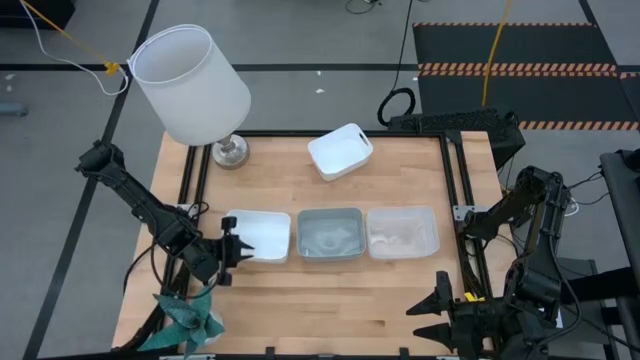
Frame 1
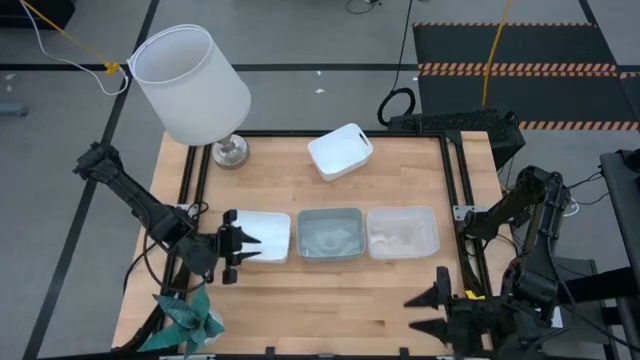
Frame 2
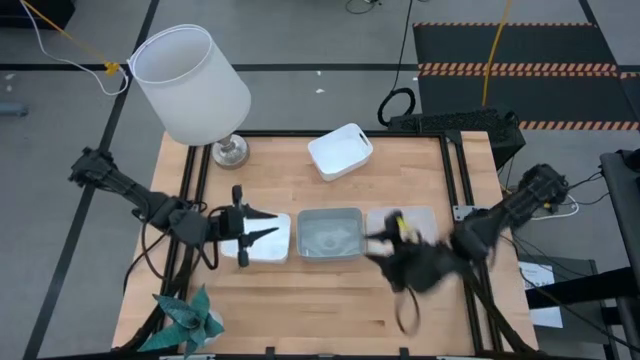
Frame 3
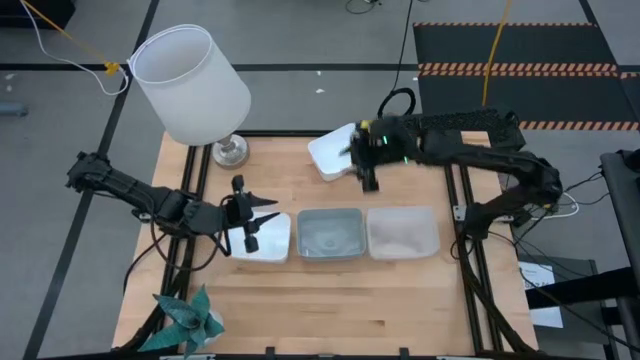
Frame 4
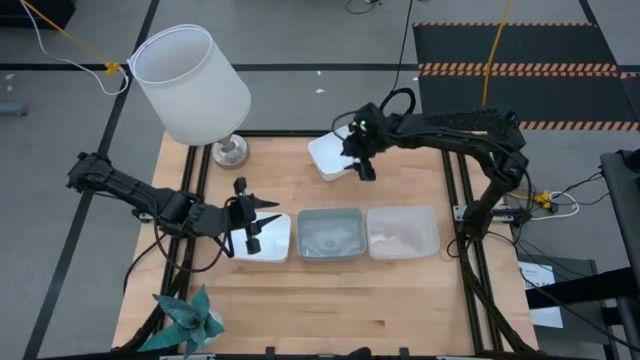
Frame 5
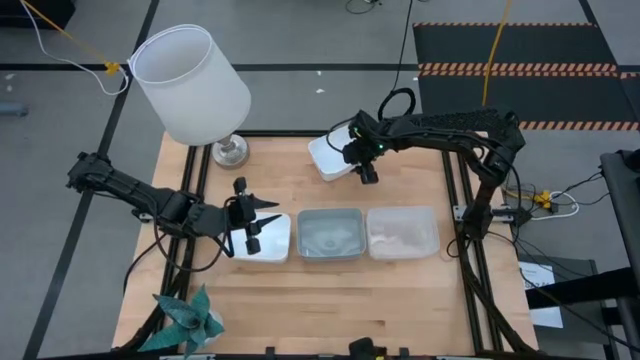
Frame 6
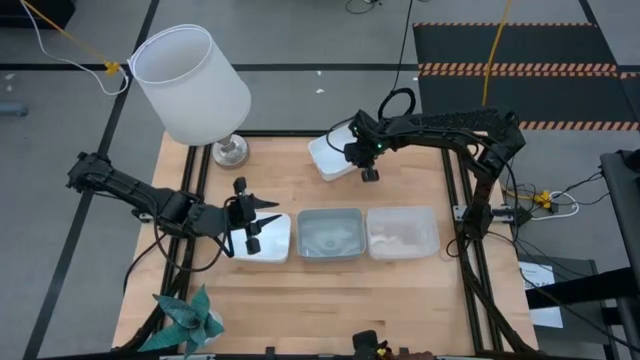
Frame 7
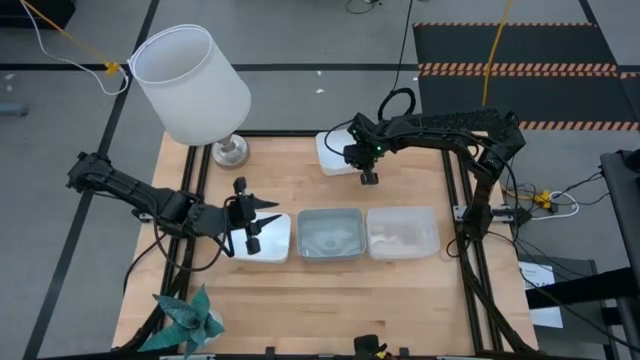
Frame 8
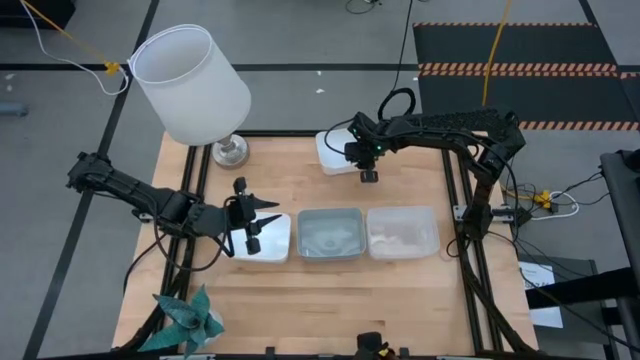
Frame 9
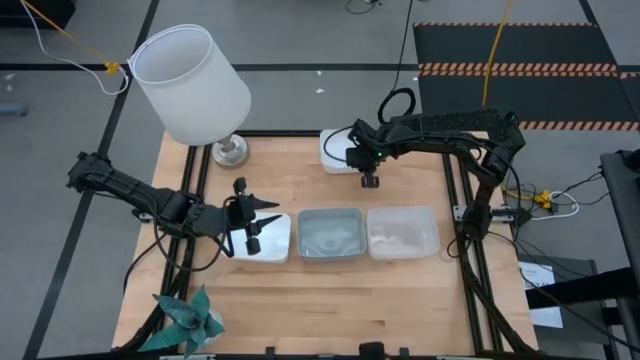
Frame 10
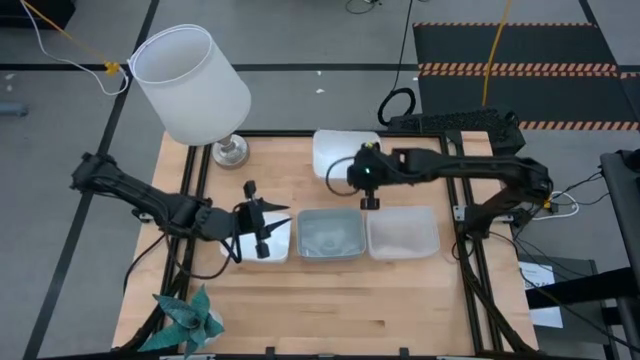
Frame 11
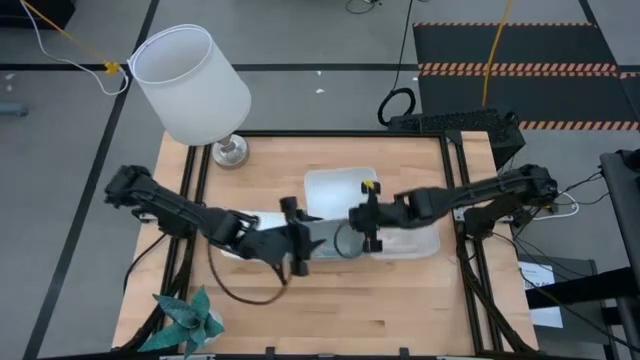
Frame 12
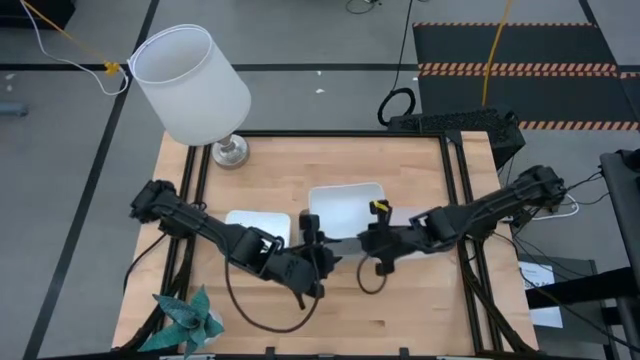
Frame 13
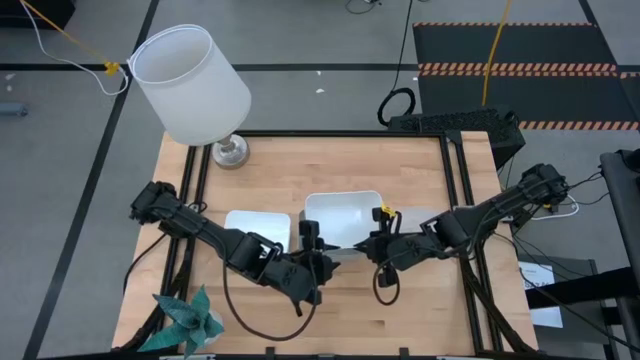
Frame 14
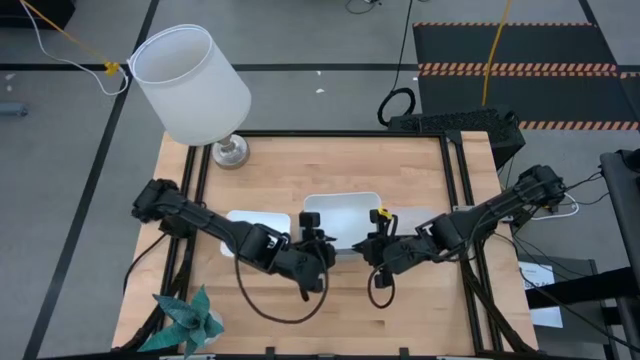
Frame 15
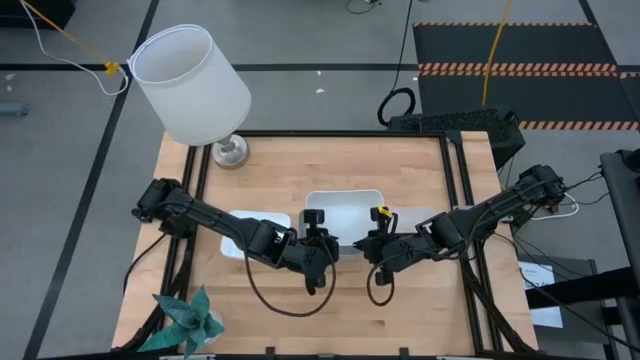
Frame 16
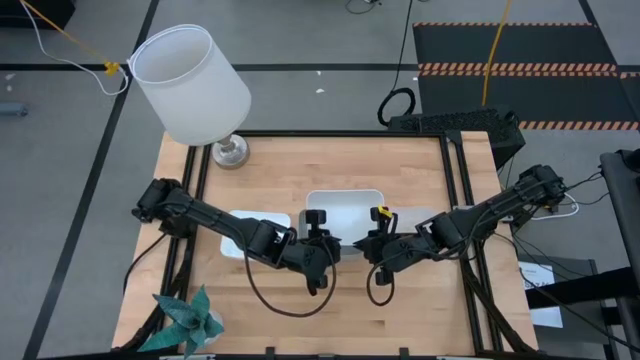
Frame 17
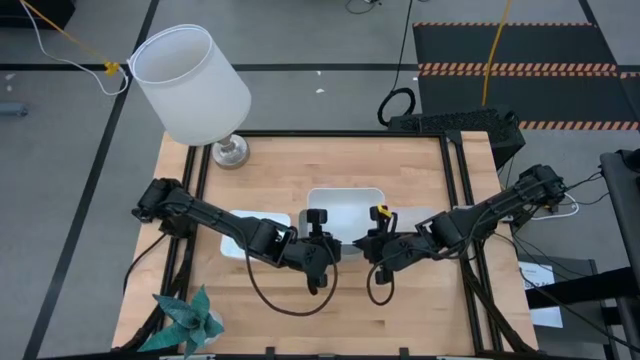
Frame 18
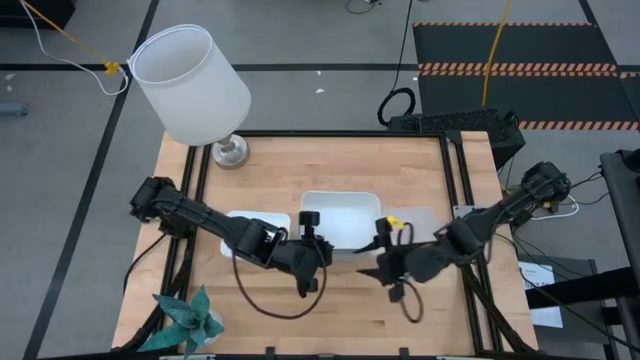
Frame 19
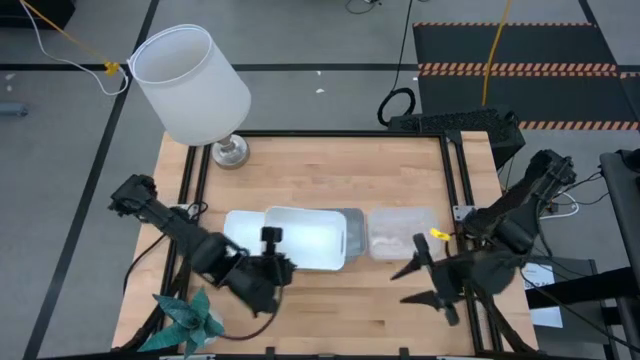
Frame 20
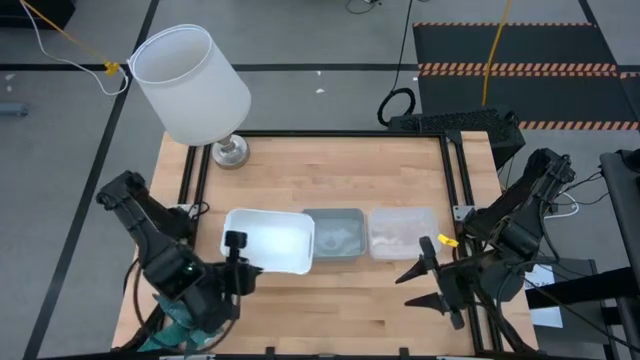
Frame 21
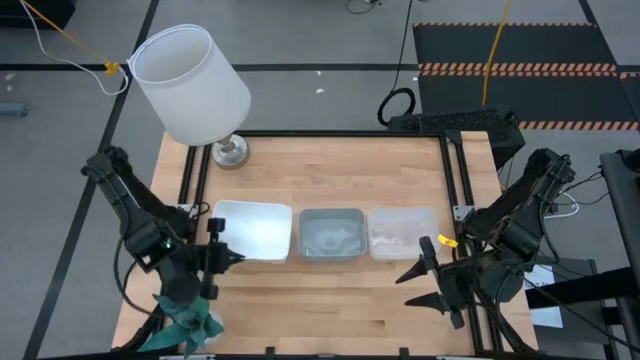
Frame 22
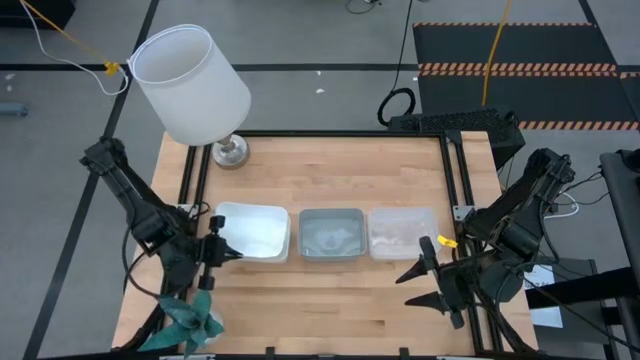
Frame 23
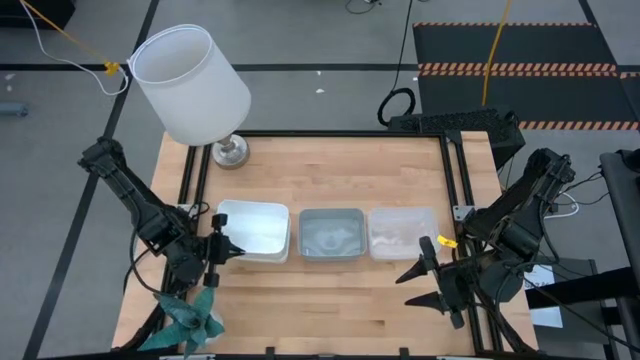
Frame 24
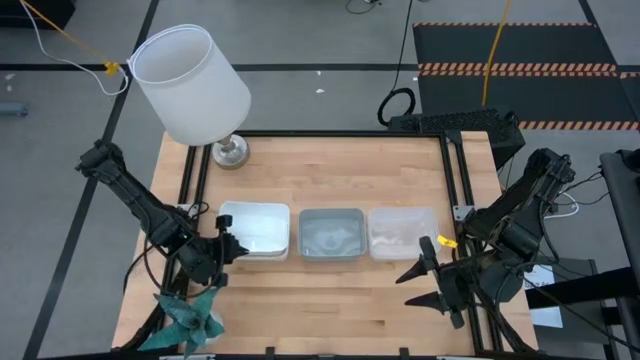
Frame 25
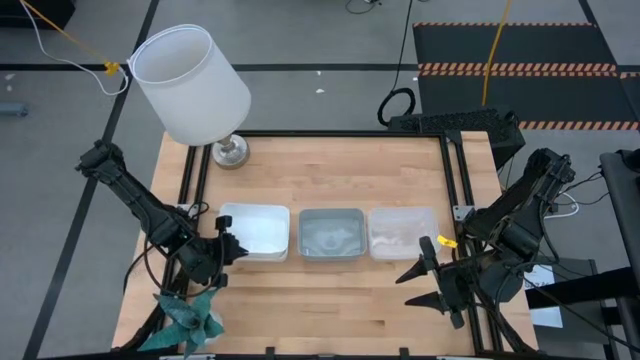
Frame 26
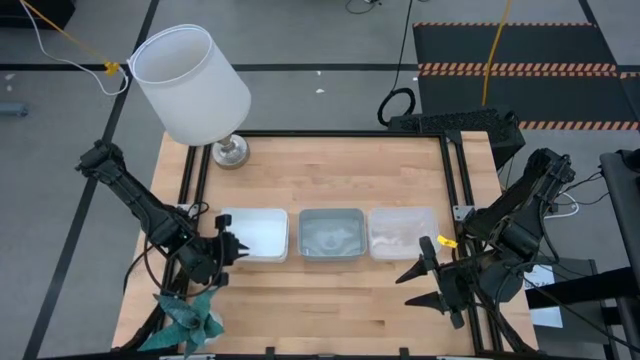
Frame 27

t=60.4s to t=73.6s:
Stack the white bin on the bottom stacked white bins

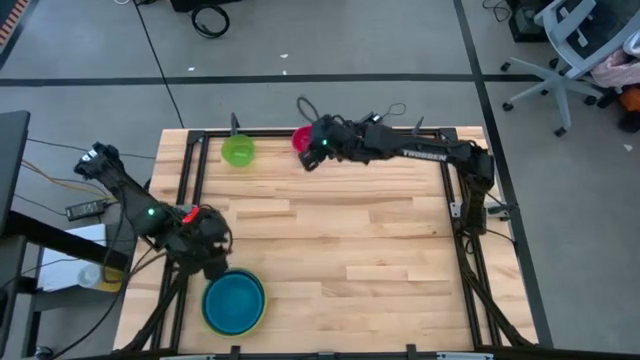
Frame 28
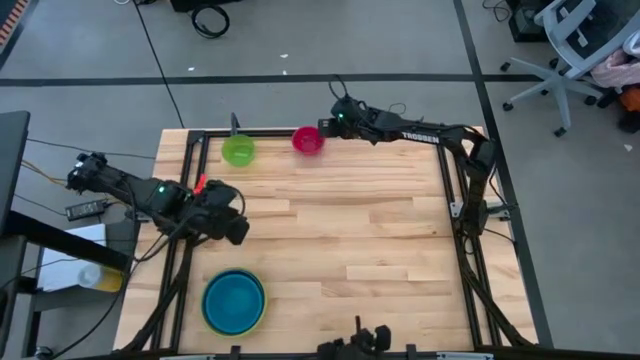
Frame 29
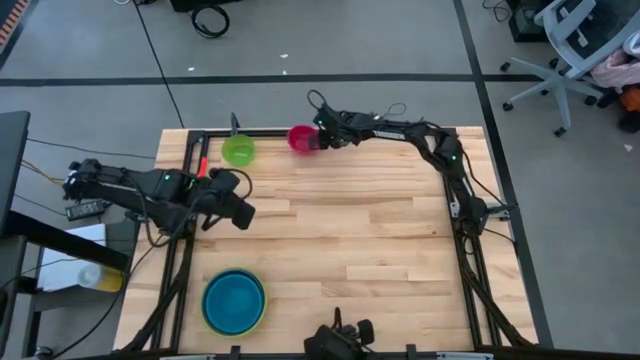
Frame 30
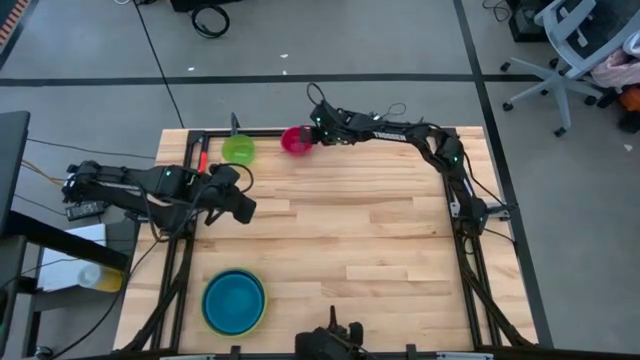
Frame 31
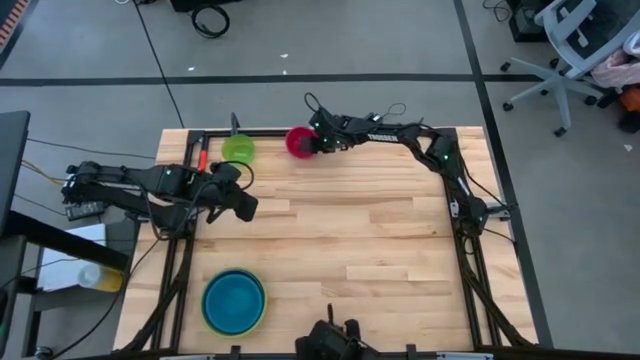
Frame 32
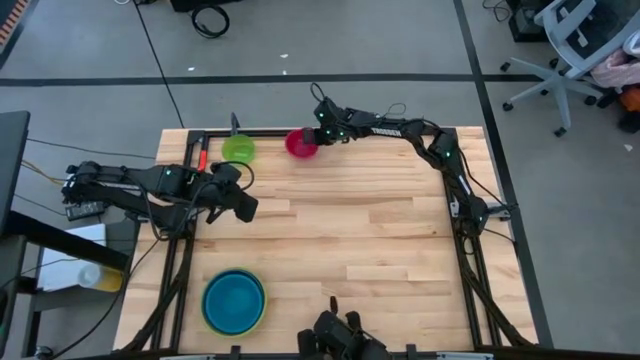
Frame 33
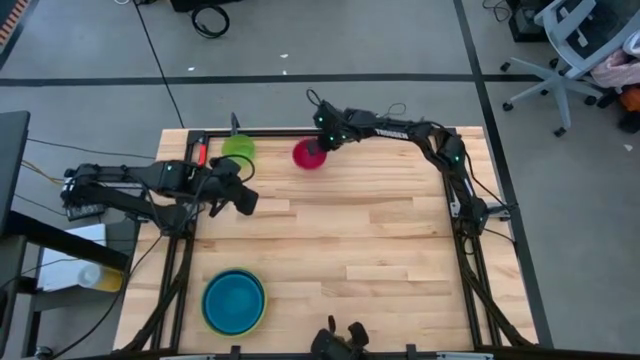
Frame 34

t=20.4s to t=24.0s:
Adjust the red bowl on the table

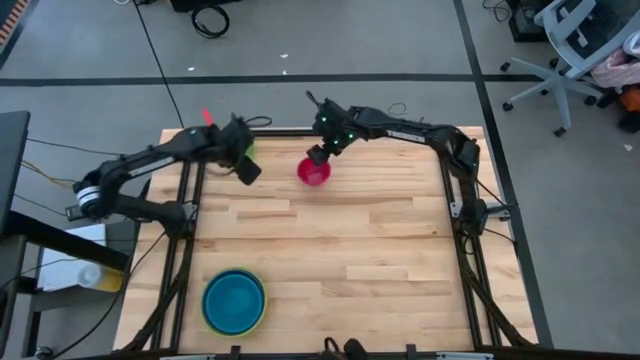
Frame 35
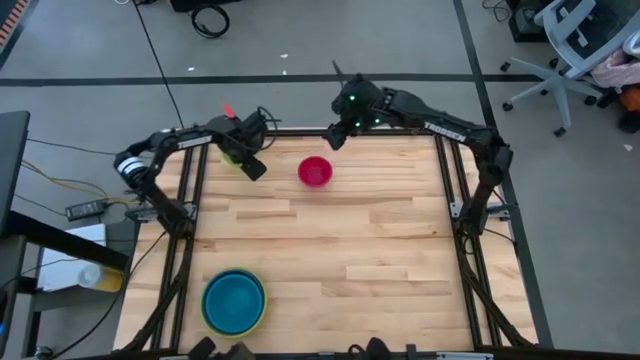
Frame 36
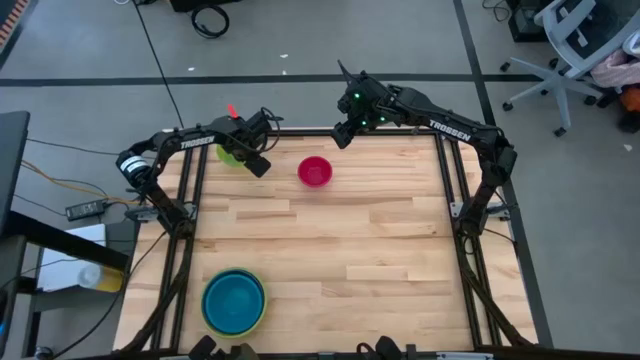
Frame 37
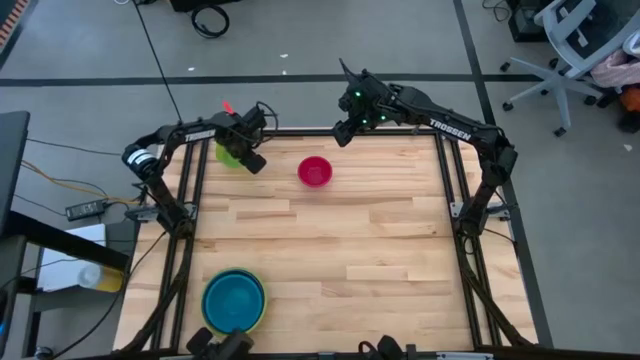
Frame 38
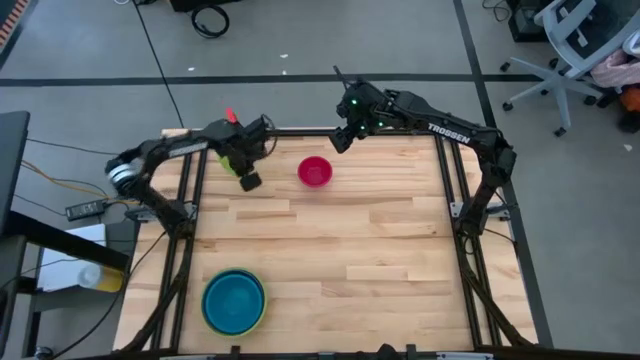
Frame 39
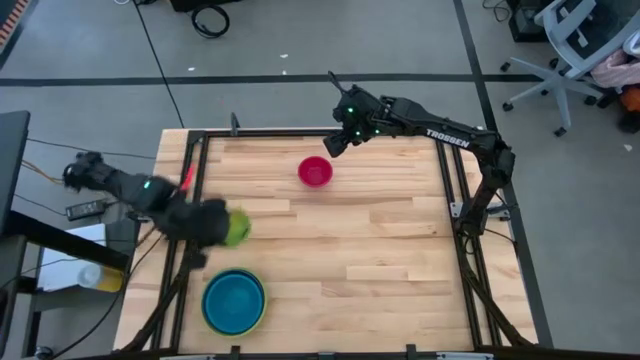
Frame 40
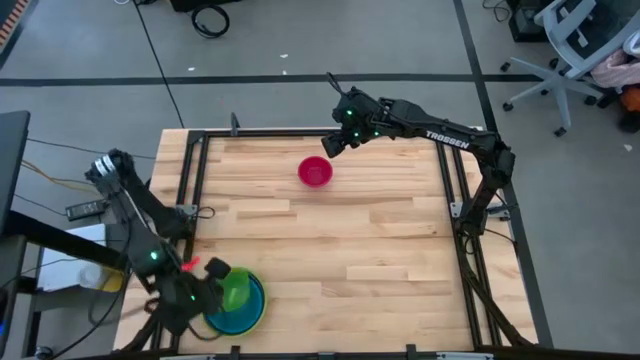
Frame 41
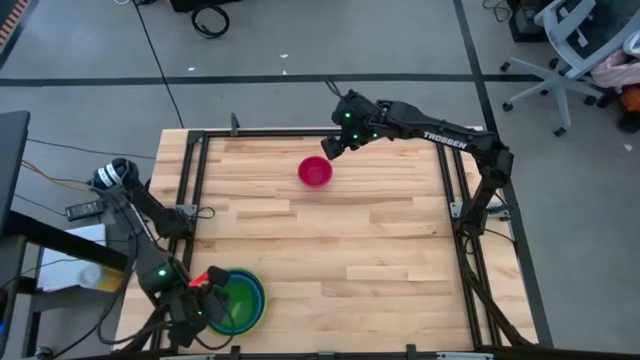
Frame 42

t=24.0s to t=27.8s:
Stack the green bowl on top of the blue bowl

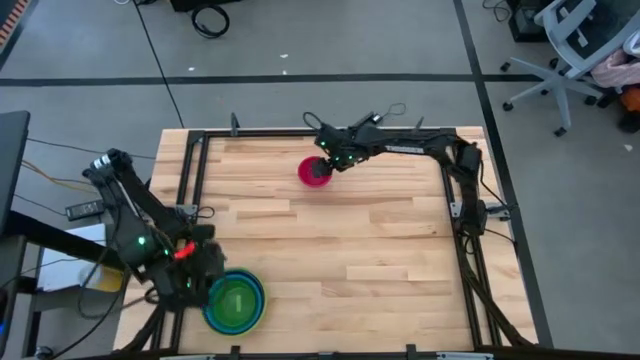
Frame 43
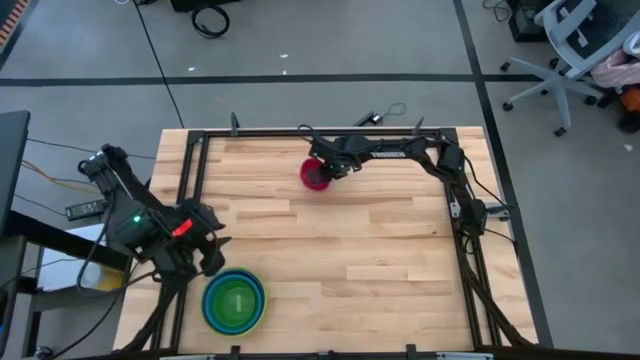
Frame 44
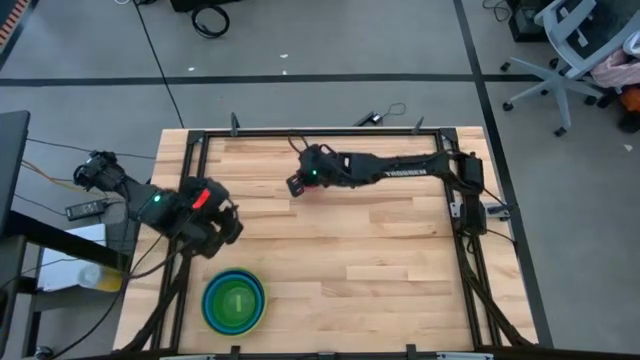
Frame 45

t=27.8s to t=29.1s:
Stack the red bowl on top of the green bowl
